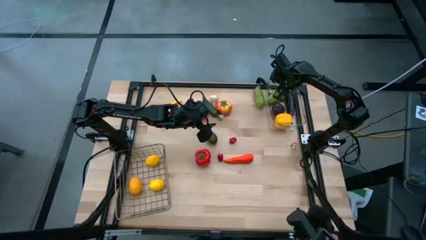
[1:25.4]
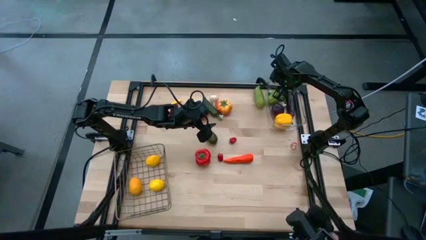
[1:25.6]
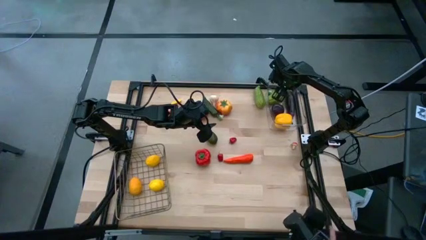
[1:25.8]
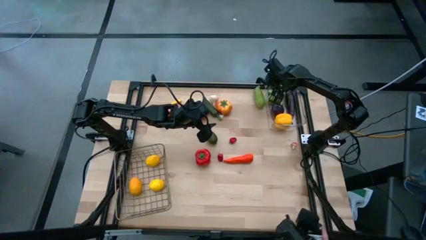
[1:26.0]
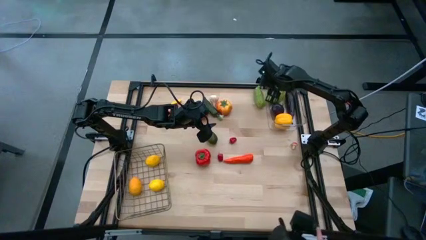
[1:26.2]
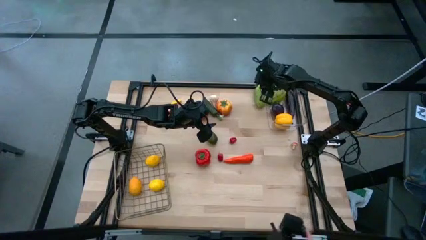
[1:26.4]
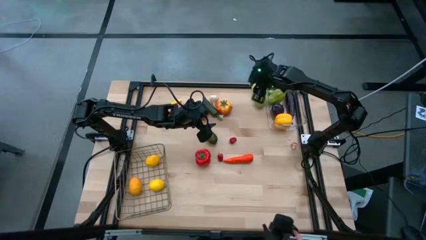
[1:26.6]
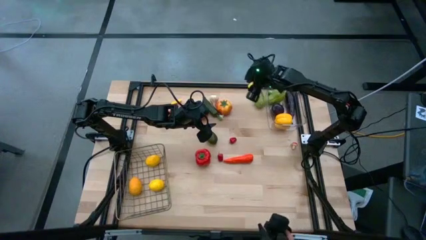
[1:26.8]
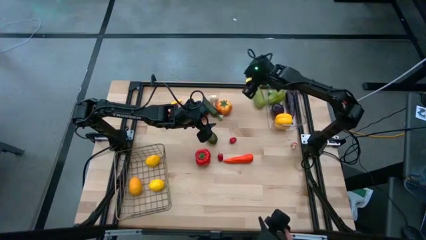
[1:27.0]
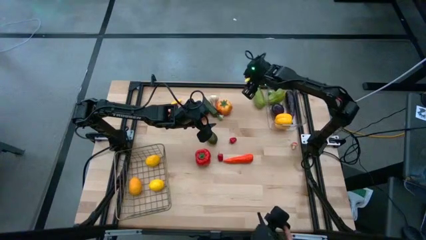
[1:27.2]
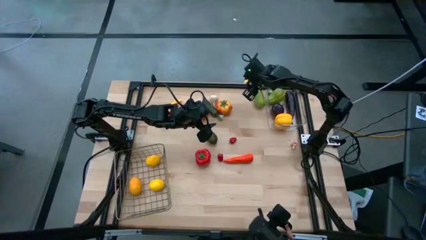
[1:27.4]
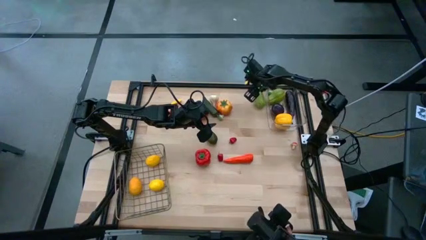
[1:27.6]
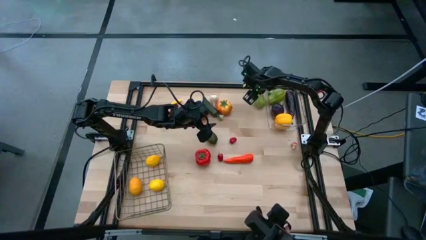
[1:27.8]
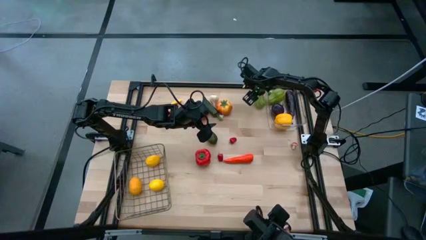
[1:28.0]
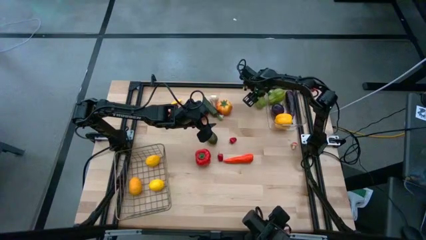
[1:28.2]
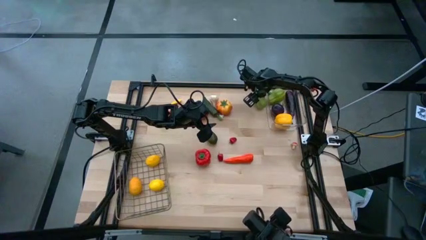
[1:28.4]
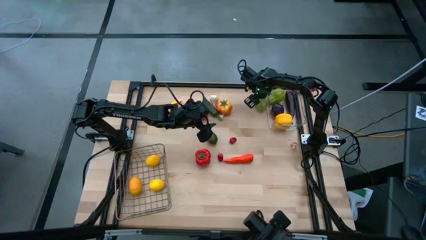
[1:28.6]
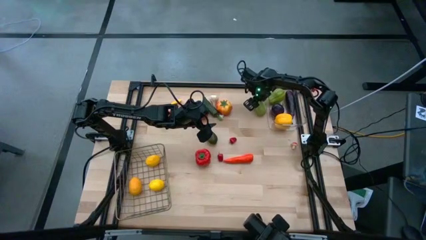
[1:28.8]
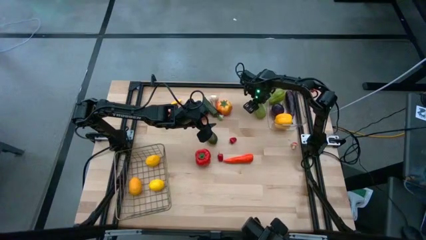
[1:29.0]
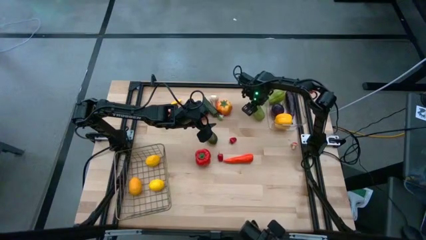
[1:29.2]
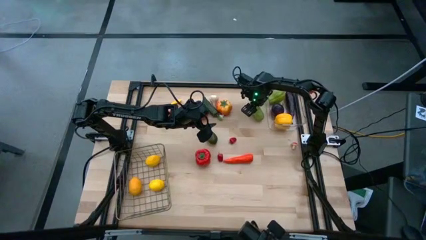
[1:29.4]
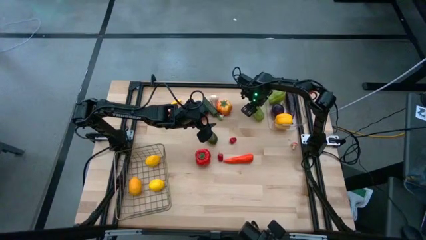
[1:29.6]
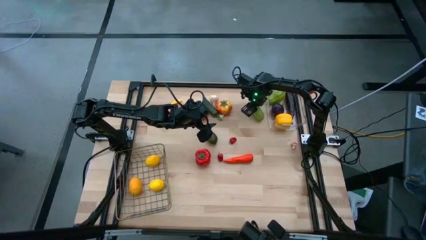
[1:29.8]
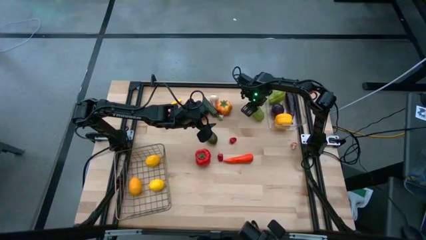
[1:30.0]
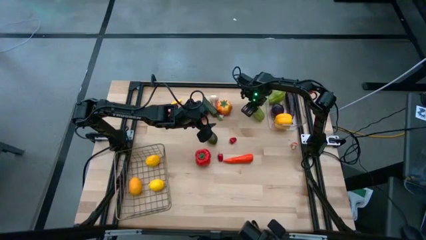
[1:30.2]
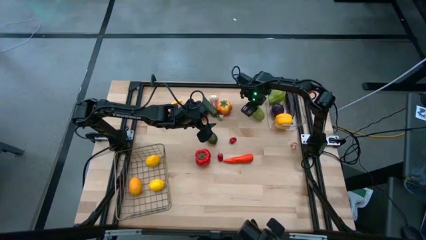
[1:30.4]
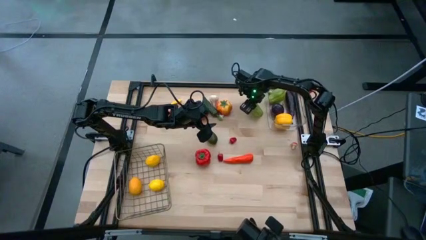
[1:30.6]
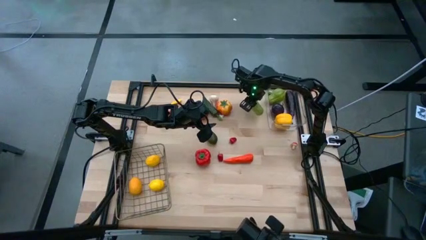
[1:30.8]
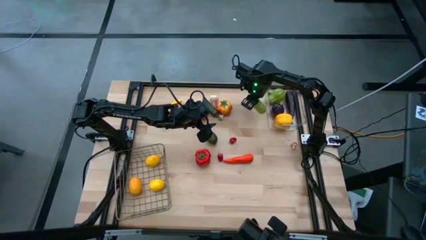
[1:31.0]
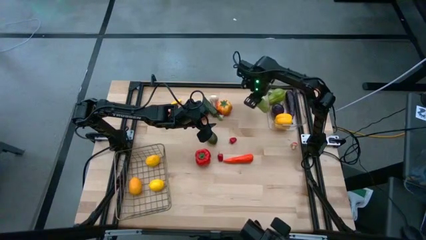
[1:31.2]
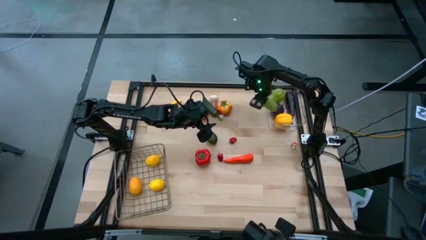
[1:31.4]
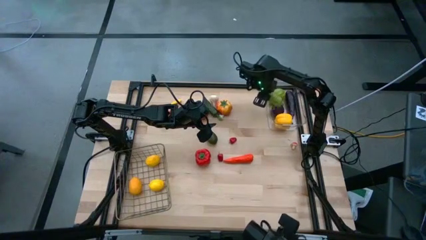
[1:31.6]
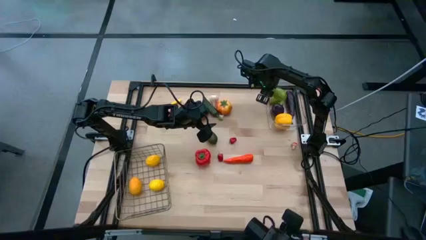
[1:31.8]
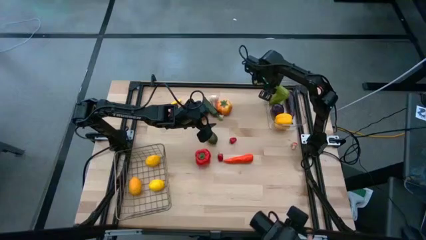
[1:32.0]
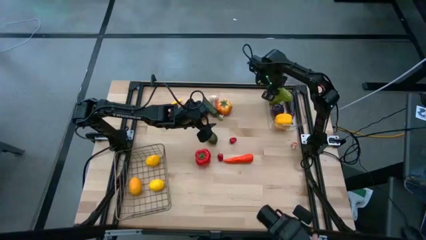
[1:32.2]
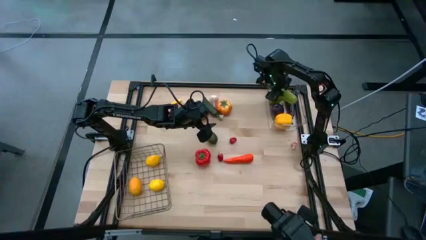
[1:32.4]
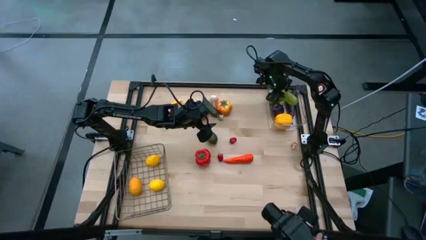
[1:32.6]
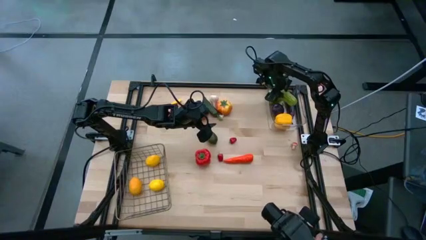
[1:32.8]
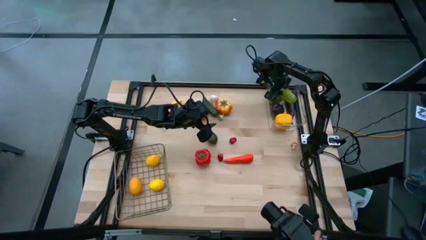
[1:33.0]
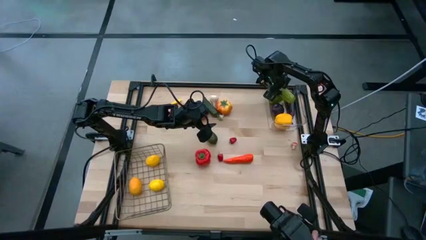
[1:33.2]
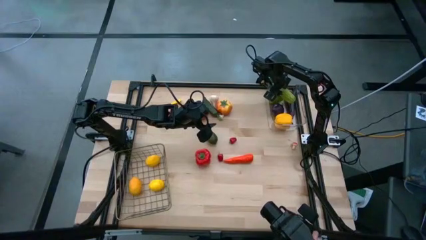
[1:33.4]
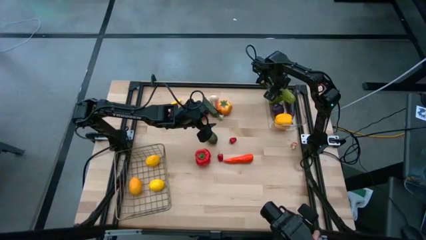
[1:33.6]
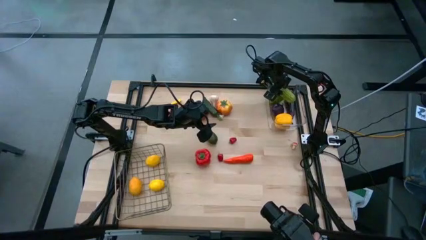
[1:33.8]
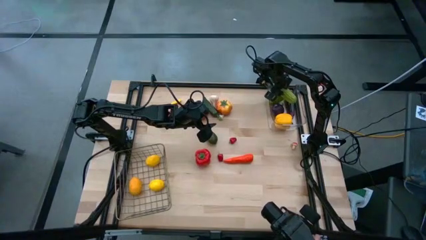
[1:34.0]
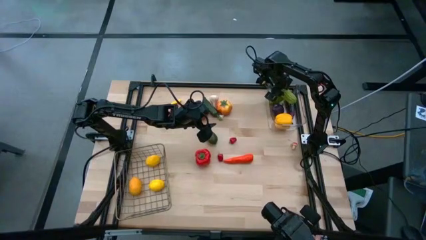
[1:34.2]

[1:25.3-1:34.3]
Task: Sort produce into baskets
Put the green bitter melon into the transparent bin

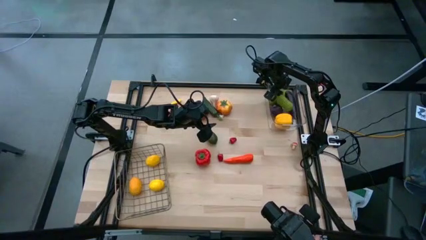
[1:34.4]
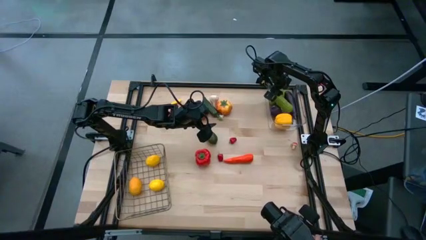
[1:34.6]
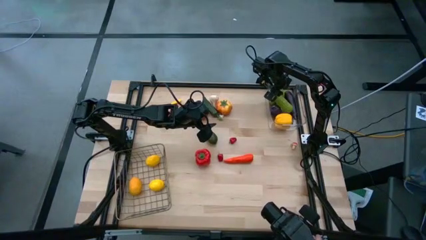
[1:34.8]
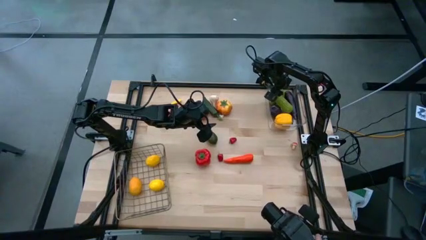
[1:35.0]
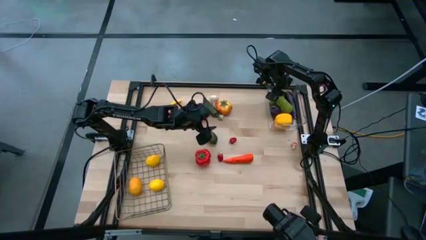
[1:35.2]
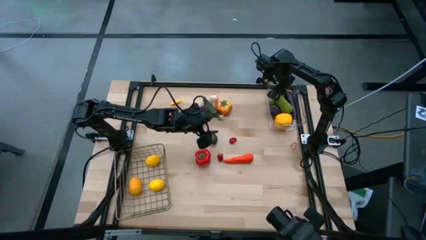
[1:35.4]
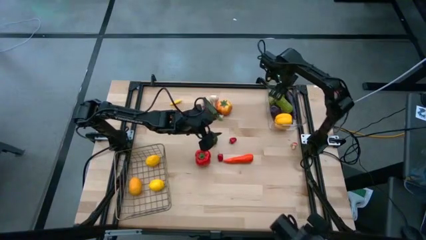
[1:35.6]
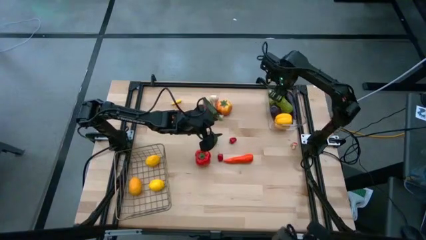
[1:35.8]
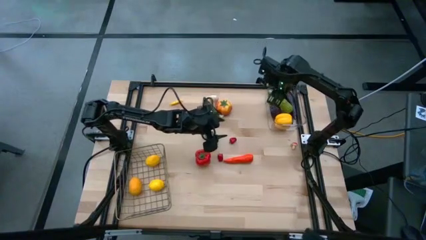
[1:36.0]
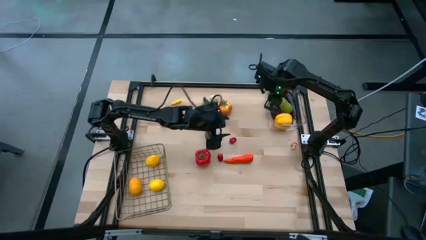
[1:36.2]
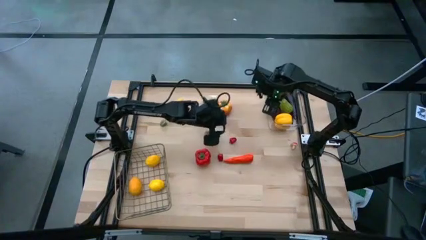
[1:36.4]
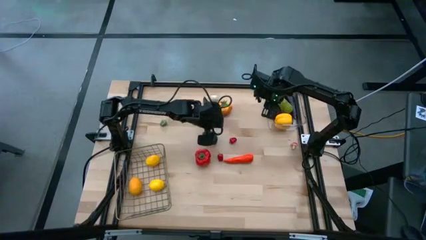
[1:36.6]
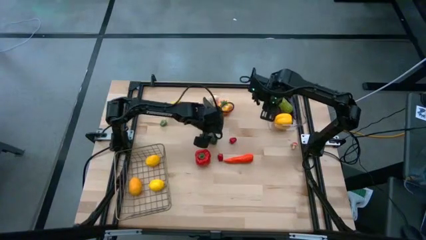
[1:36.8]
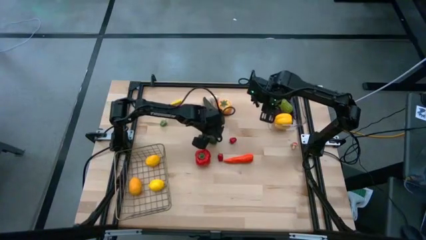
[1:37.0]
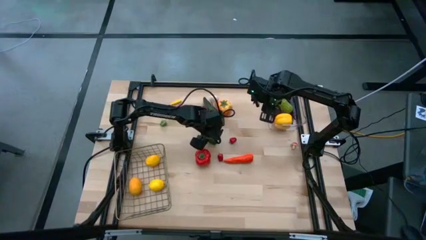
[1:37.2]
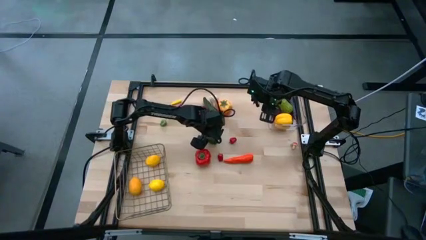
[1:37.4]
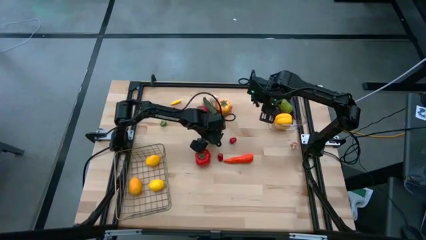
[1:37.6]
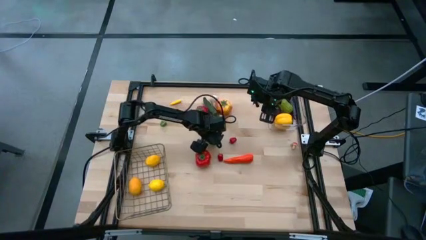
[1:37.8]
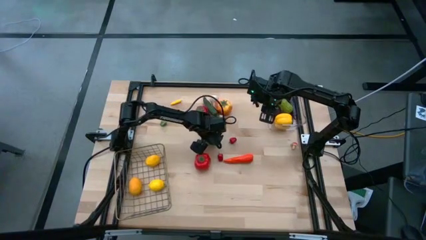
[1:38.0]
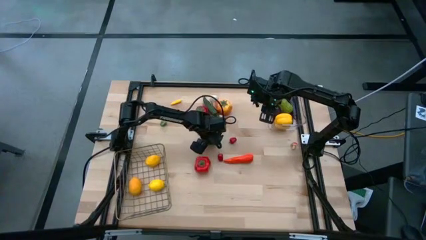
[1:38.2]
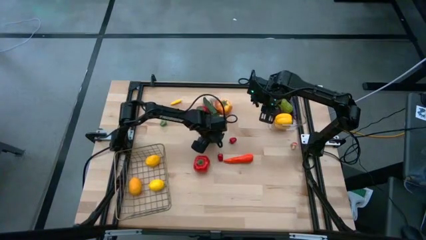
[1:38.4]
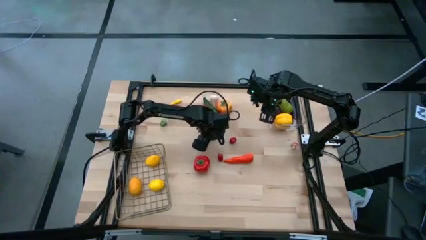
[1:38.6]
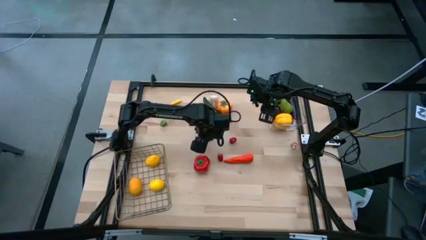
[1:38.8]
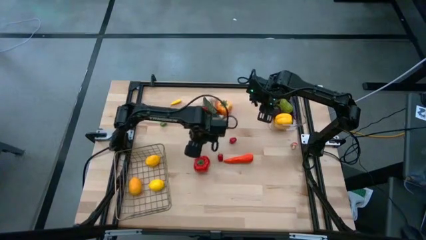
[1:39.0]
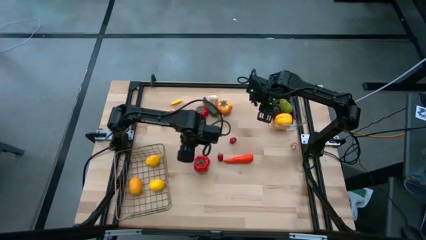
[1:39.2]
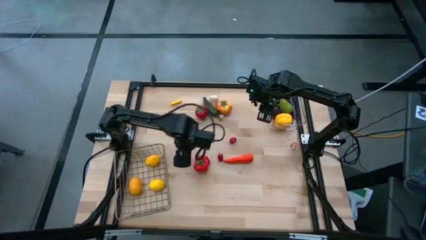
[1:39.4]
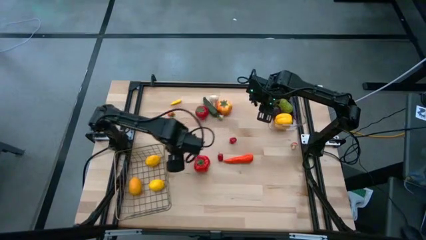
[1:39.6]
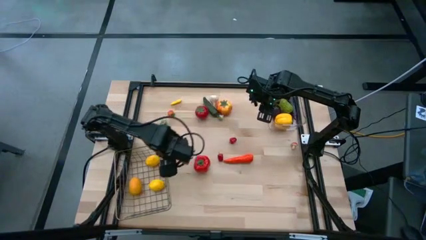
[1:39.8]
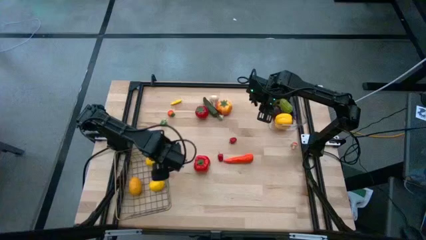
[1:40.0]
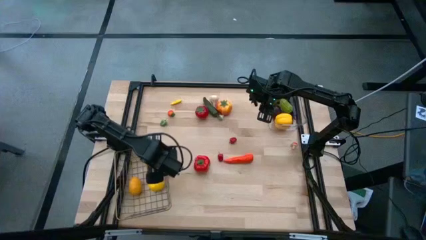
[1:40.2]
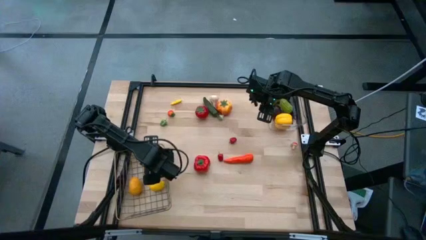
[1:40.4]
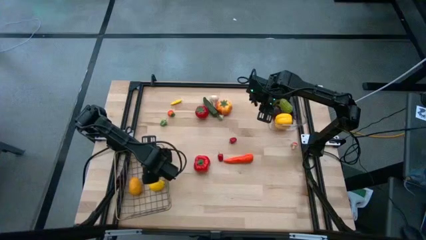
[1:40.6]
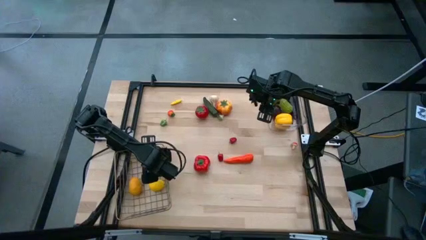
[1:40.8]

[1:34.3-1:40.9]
Put the green lime into the wire basket
